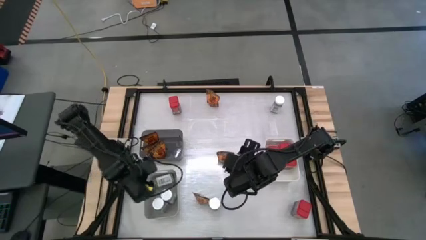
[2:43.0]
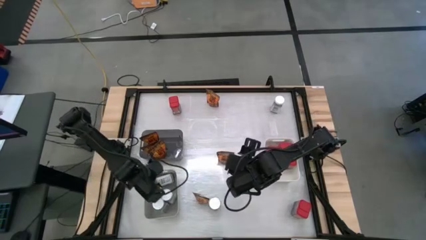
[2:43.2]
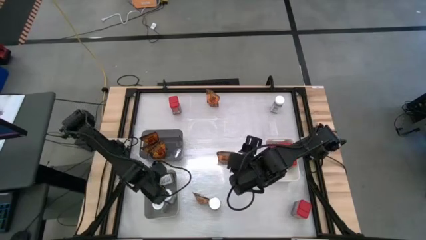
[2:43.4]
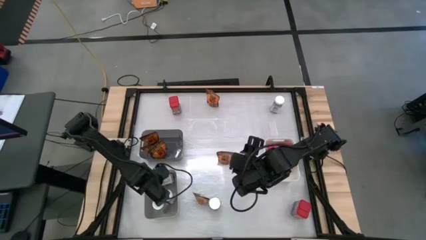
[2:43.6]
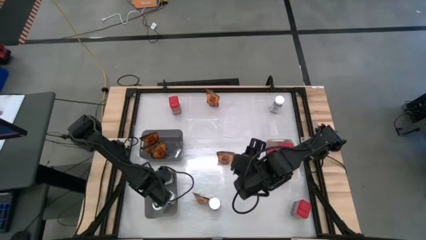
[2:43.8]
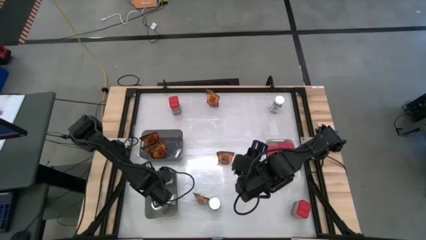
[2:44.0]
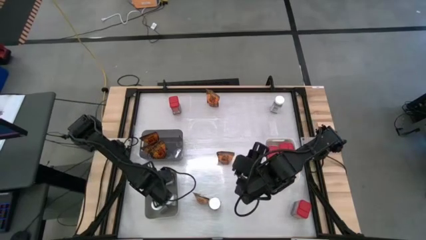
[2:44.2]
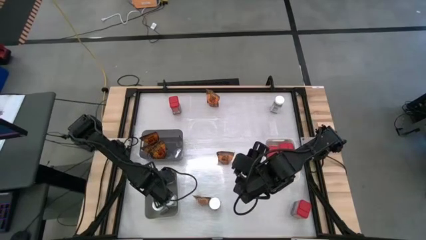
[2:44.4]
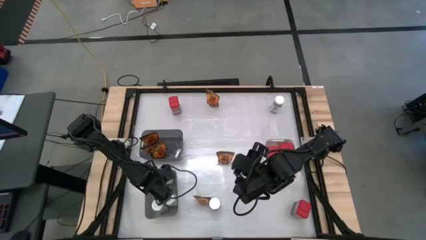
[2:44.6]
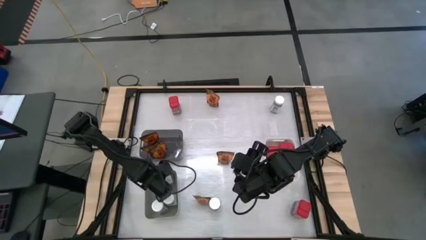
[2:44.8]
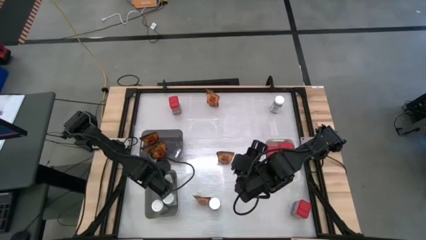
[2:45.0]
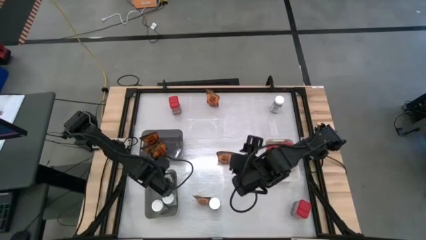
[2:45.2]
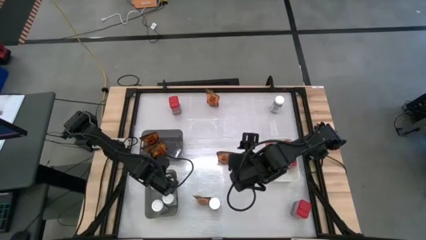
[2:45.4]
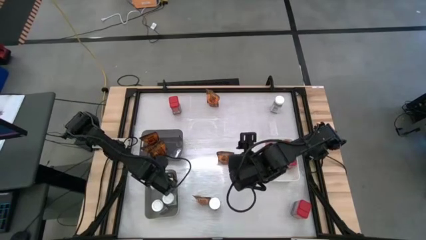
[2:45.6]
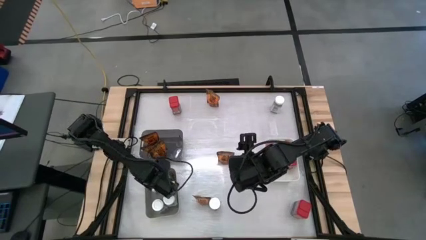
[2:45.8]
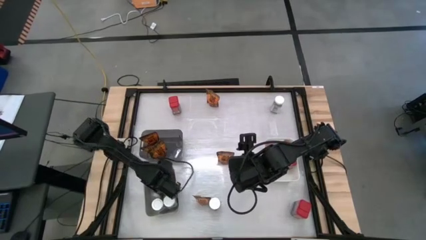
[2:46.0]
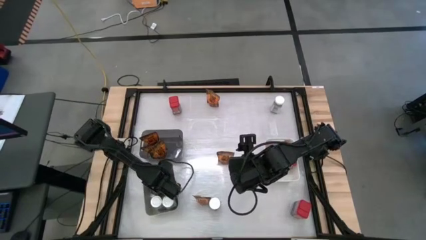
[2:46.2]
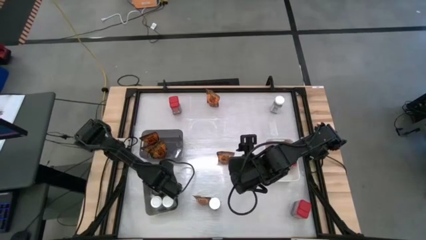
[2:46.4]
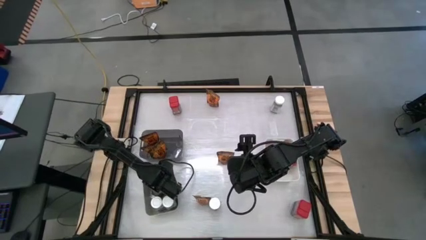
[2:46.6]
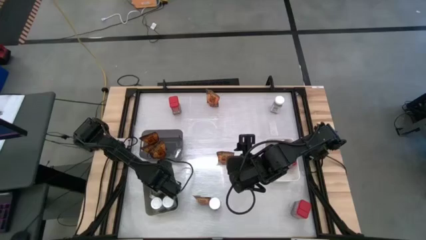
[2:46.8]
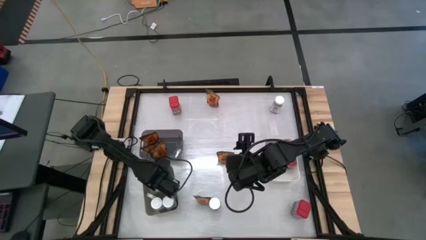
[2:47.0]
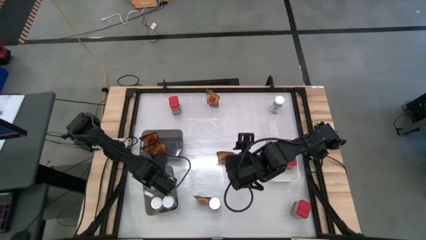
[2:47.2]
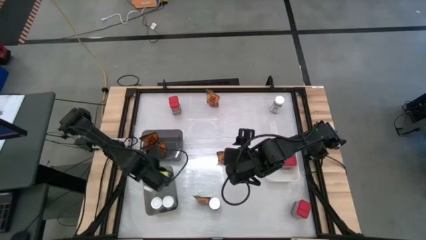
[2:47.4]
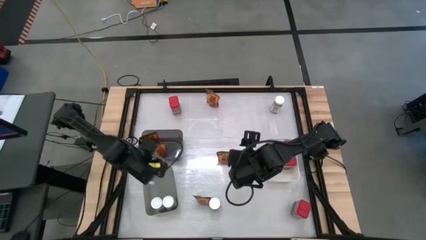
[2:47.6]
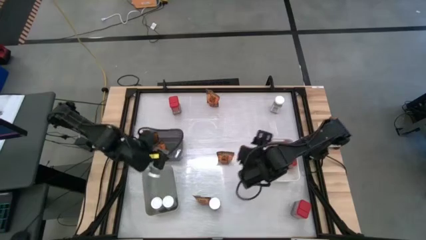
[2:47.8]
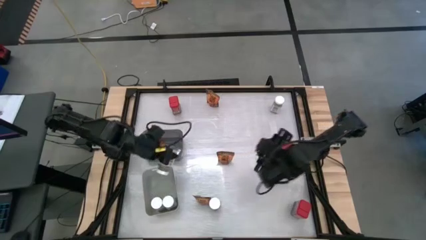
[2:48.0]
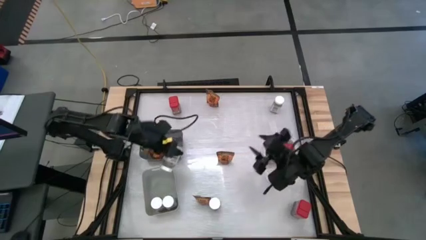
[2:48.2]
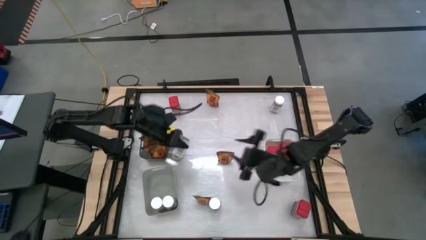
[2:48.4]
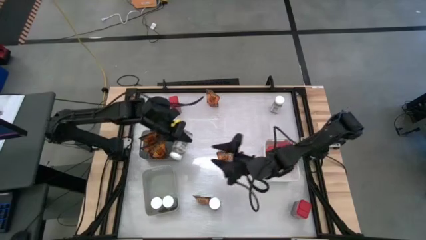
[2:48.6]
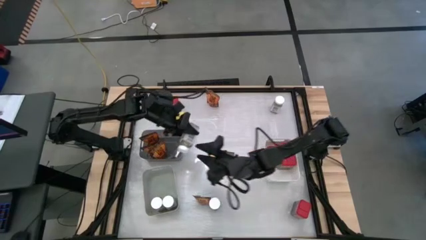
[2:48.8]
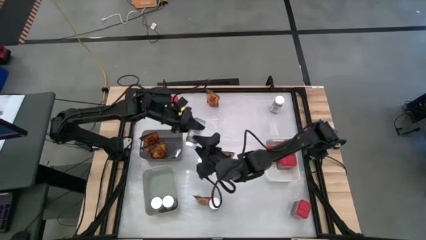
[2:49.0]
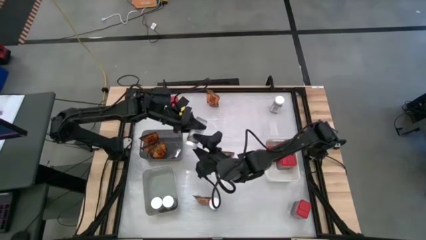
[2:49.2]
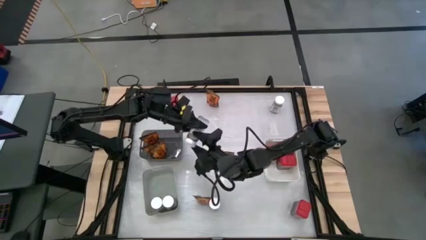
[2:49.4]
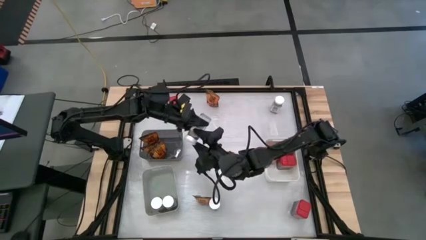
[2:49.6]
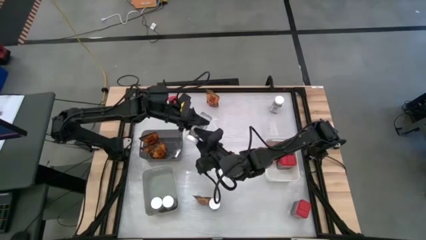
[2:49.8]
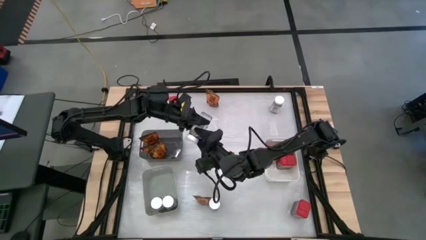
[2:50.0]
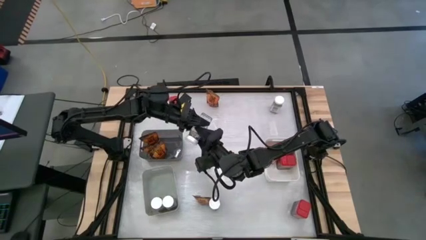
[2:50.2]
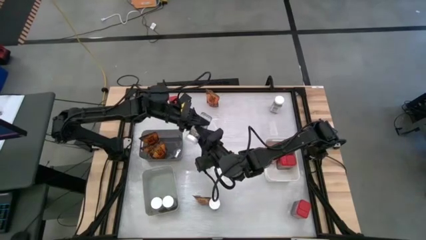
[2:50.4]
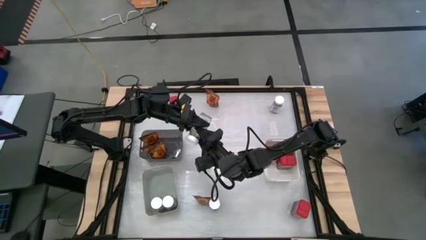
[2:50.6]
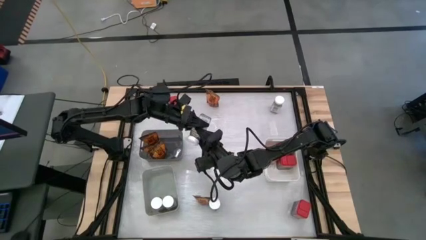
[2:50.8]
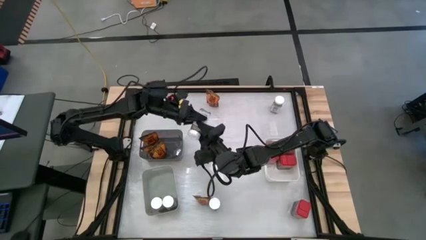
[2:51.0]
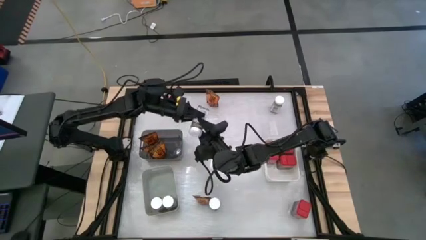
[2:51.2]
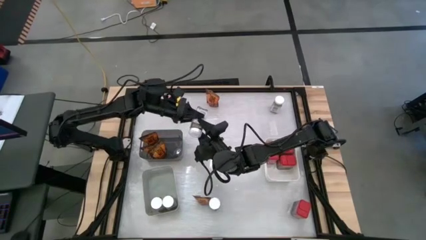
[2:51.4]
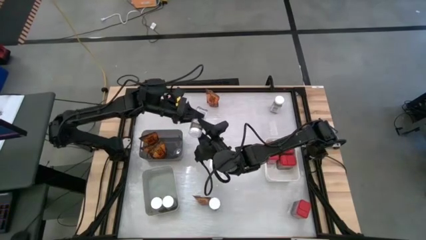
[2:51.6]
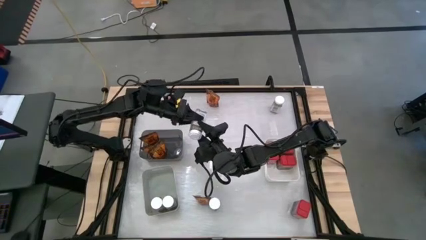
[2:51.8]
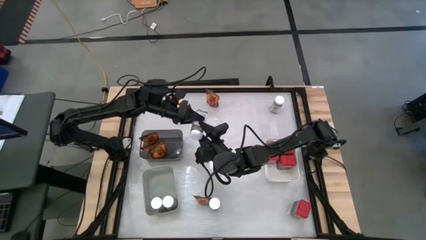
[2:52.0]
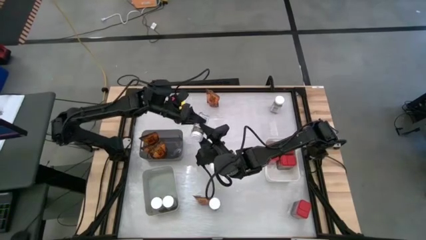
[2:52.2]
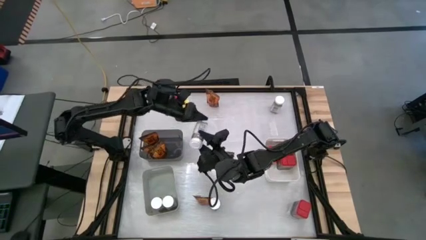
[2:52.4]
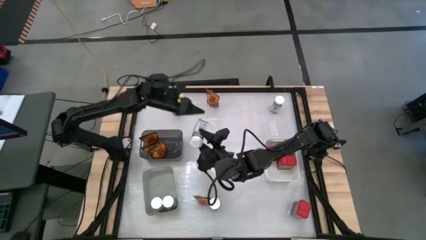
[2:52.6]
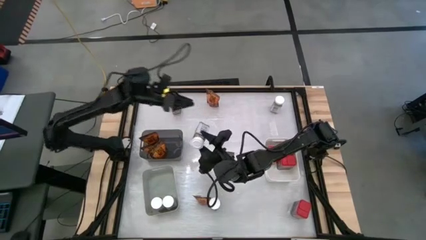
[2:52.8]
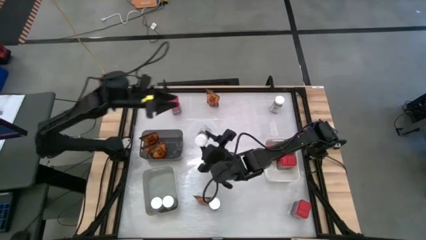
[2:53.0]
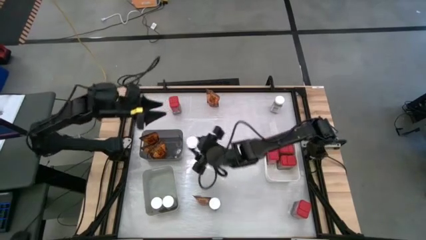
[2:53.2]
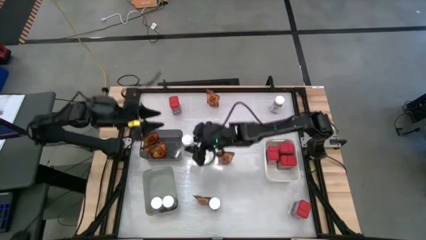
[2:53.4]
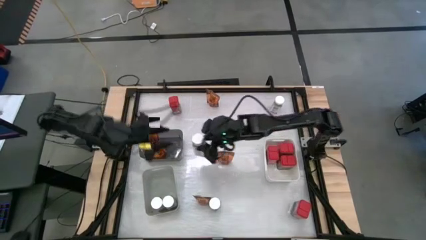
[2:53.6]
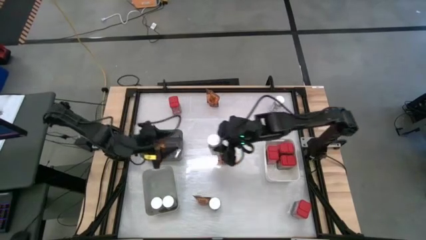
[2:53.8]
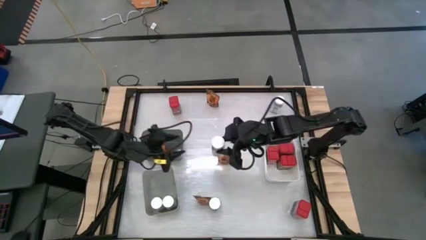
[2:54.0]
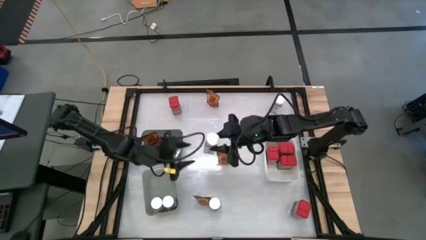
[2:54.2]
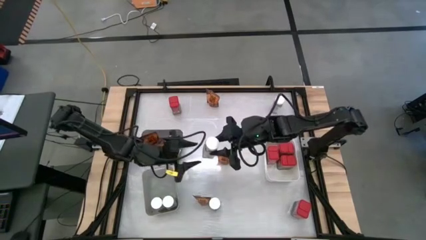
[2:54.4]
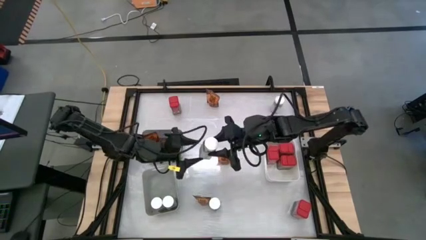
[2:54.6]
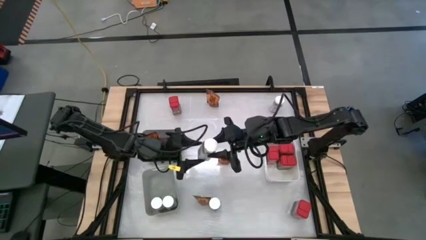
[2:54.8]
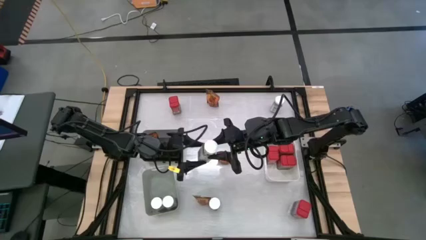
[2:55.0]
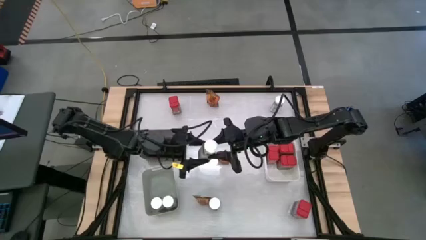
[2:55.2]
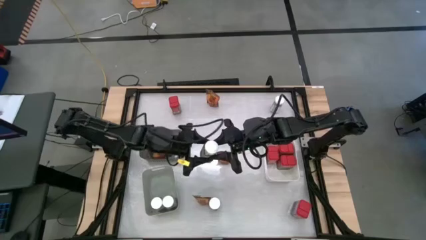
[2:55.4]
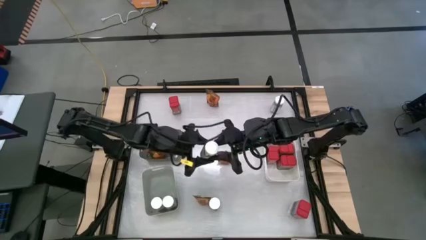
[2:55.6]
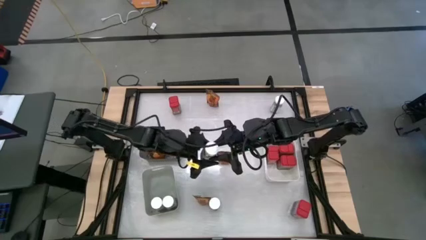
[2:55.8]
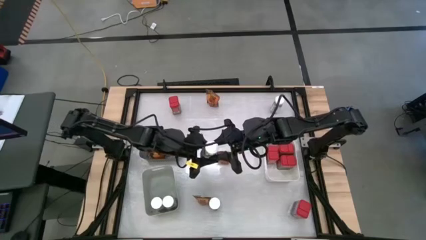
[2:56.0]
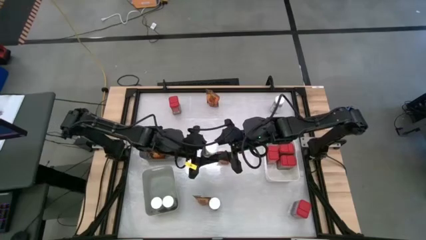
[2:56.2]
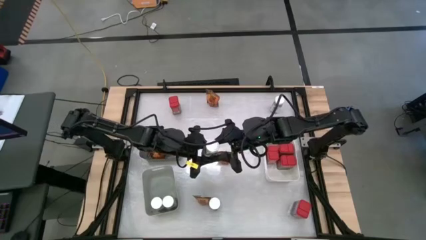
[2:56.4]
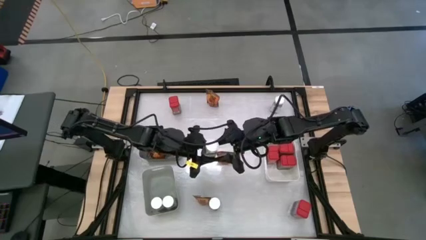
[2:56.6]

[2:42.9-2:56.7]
Task: Sort spices by type
Adjust the white spice bottle inside the gray bin
